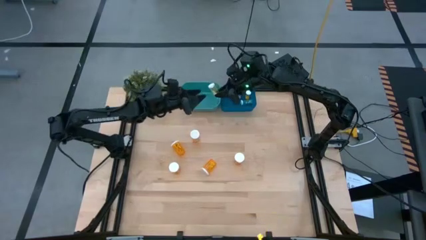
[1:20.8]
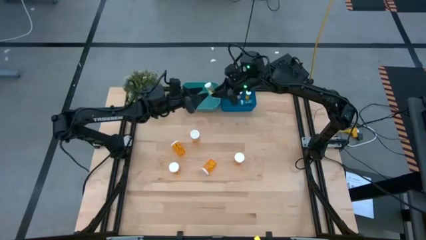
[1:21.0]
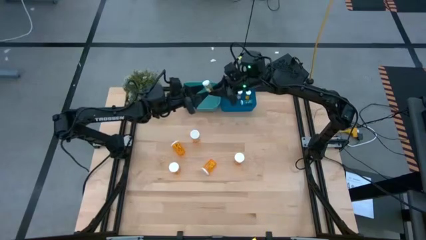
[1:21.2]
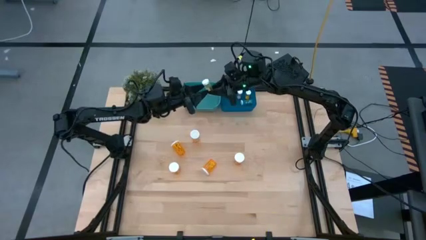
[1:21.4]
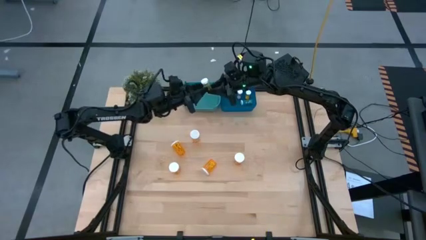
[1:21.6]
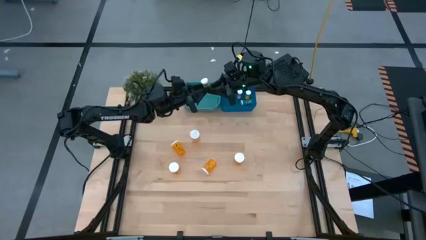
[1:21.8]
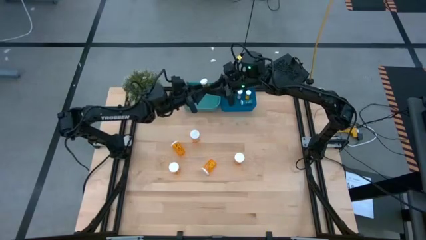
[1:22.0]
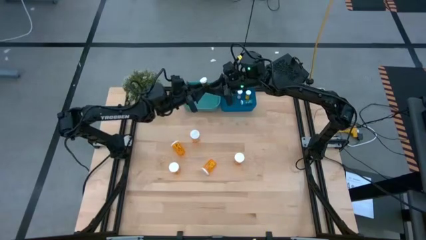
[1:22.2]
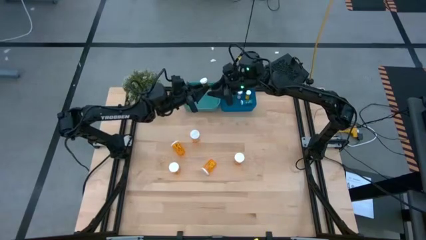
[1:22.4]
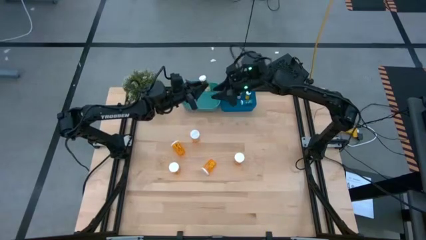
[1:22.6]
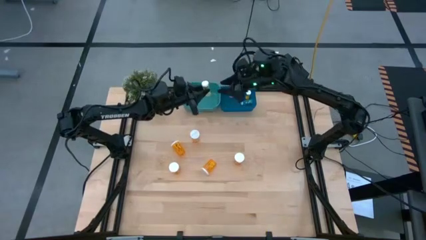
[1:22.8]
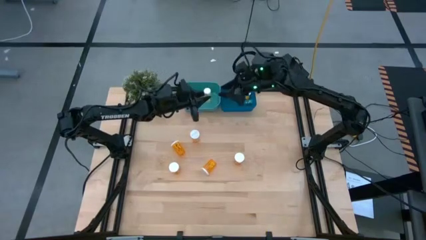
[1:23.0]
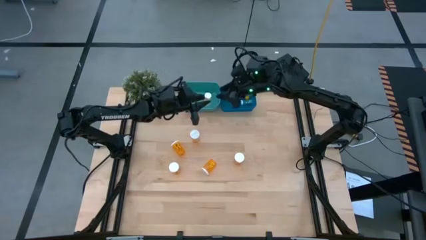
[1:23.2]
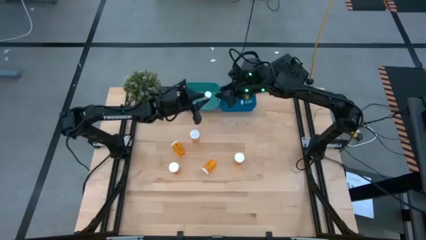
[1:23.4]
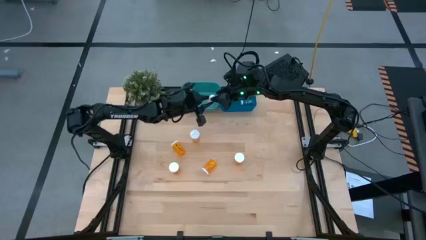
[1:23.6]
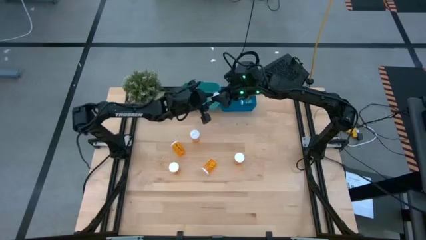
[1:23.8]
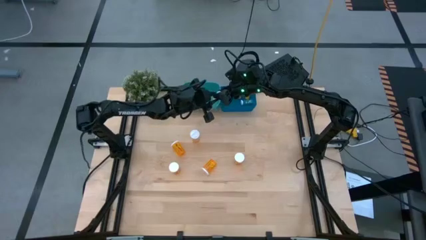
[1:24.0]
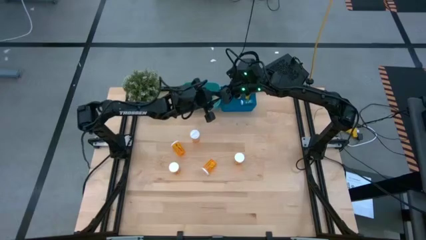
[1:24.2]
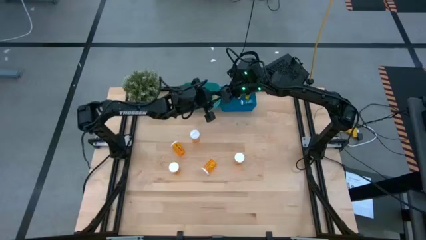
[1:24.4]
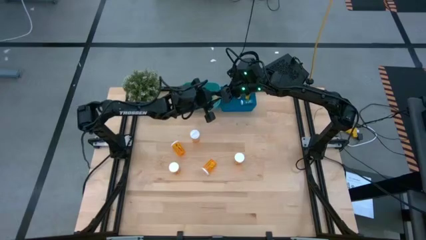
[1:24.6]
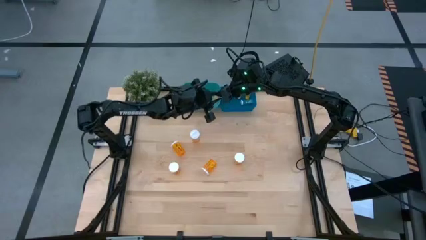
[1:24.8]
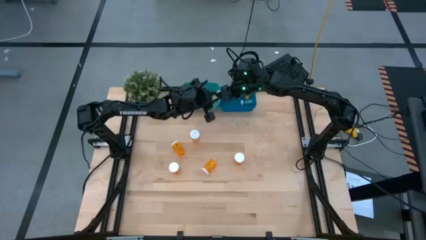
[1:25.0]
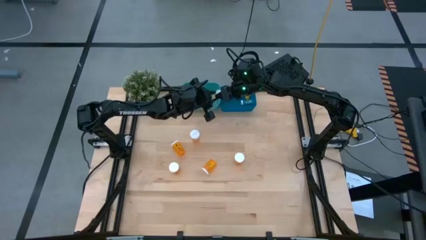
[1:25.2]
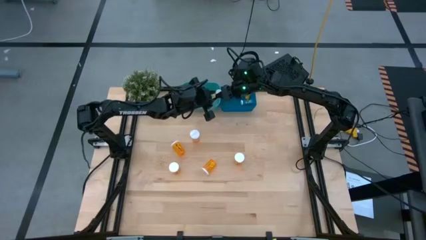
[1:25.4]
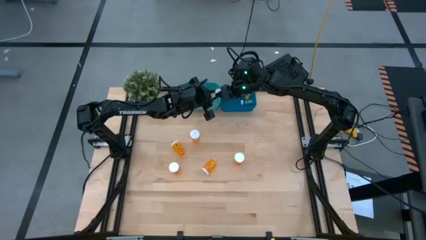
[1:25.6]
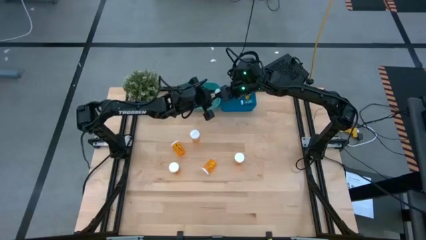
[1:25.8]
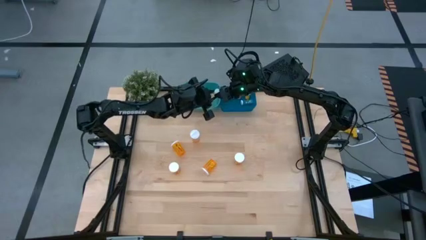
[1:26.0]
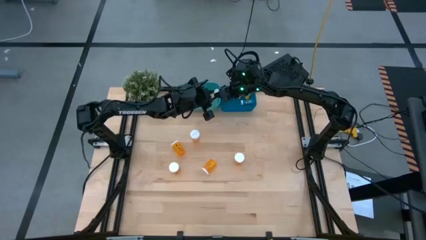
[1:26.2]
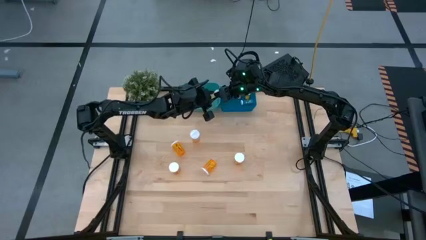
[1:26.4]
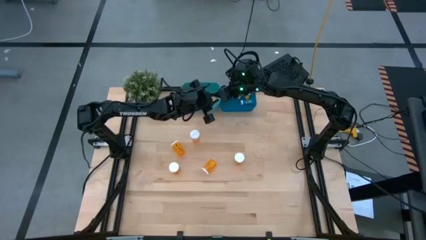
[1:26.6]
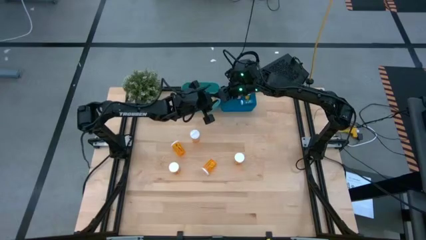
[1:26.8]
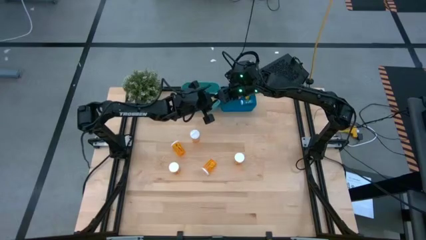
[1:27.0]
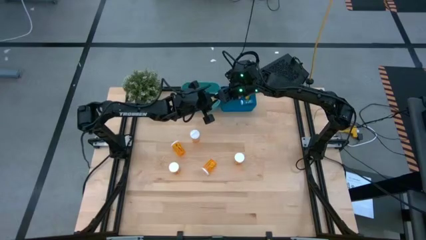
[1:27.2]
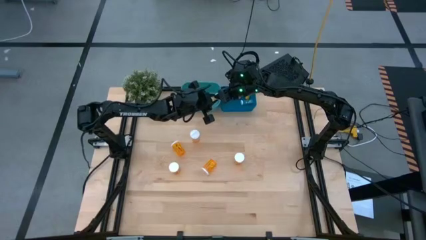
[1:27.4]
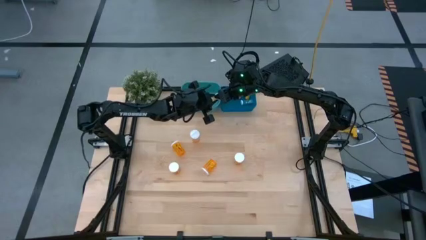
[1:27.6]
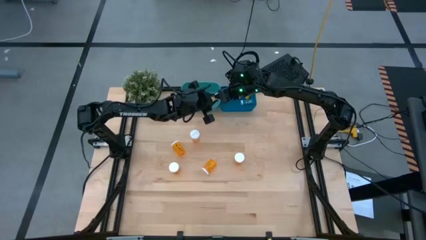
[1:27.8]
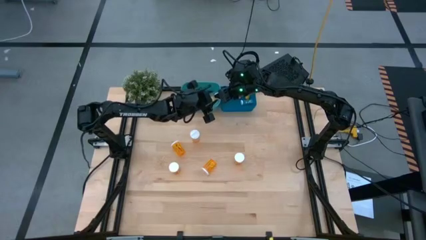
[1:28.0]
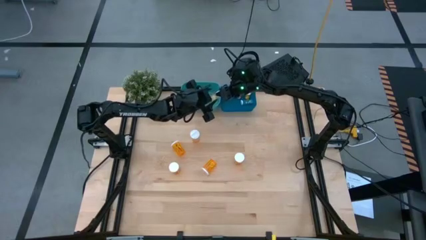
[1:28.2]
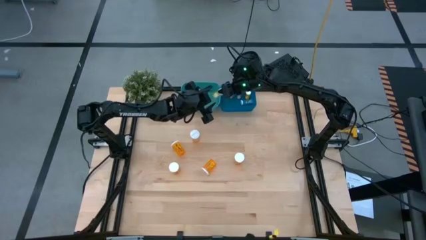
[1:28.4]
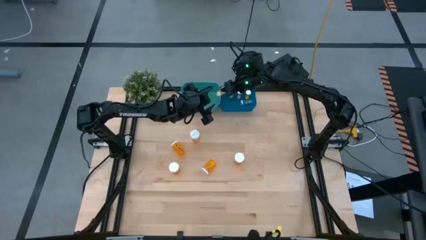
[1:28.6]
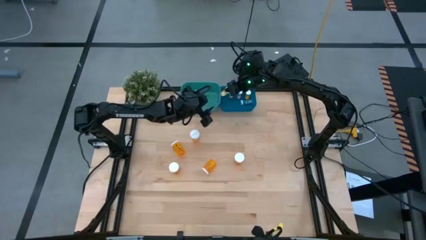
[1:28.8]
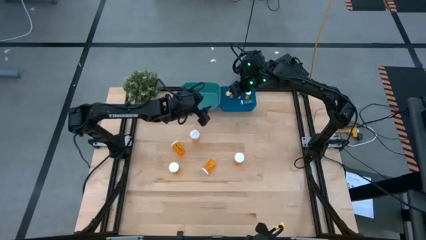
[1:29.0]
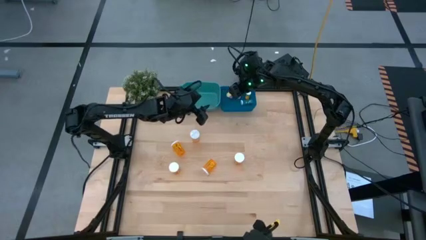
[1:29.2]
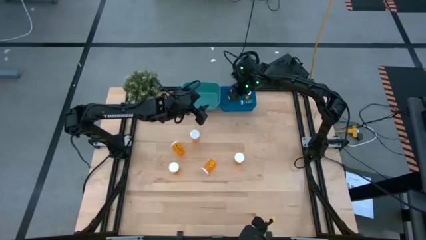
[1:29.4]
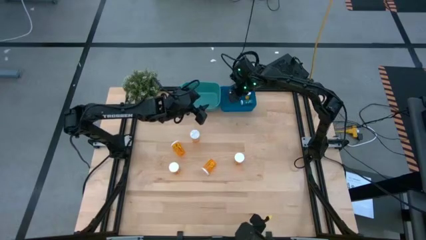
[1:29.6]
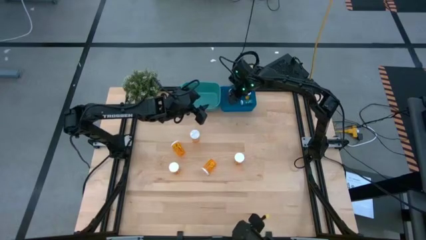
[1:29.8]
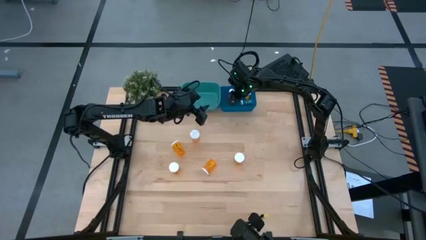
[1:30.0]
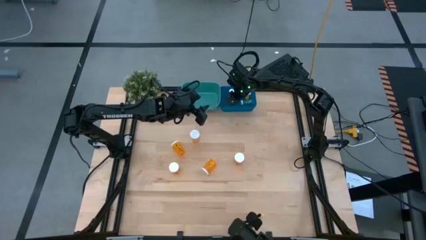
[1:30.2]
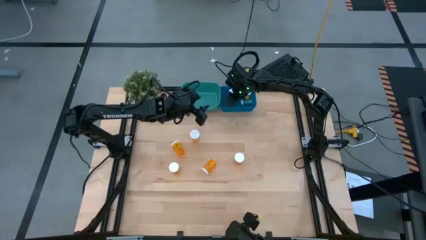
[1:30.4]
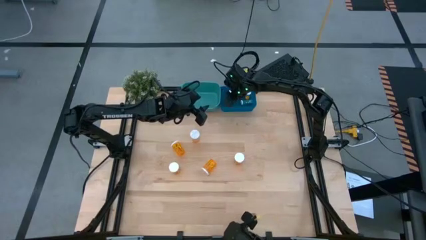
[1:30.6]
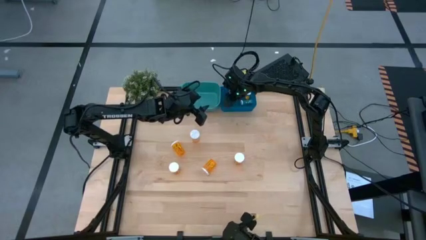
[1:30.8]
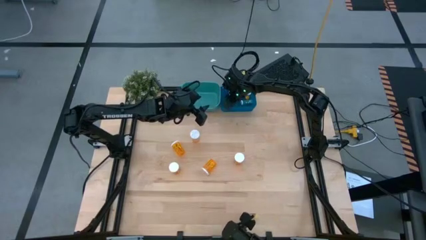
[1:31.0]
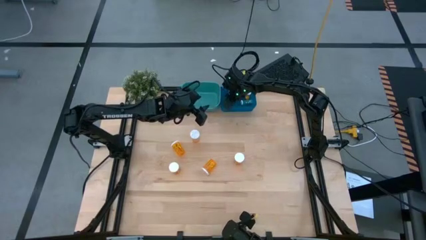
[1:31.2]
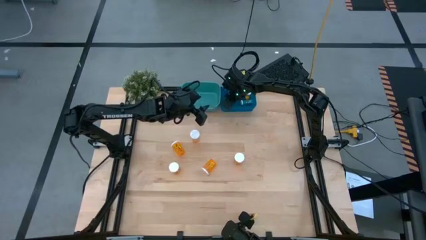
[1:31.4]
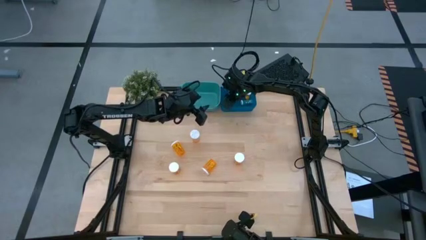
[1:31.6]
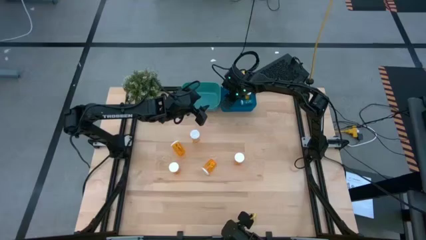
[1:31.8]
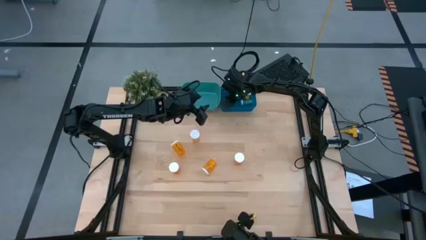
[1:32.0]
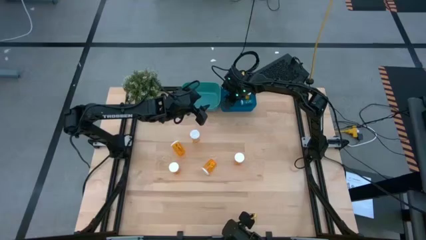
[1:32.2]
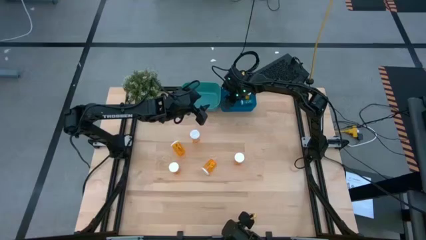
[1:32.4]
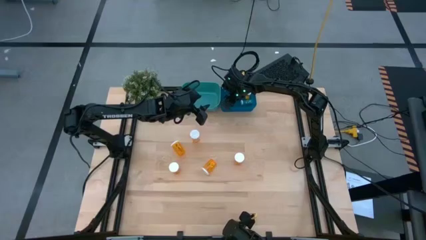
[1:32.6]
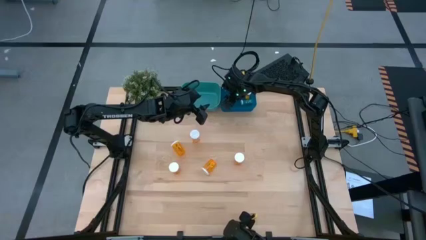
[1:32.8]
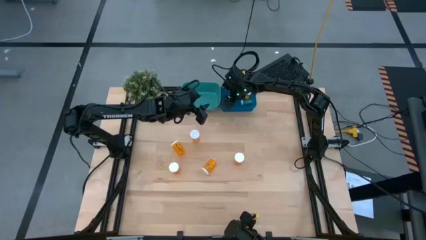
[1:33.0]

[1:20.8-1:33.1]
Task: Pick and place medicine bottles into bin by pill shape (circle, oval)
Adjust the small yellow tablet bottle in the blue bin

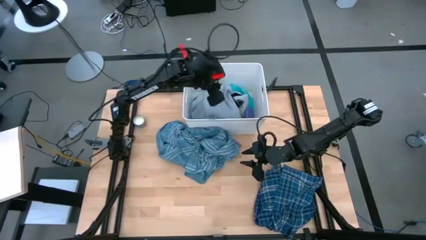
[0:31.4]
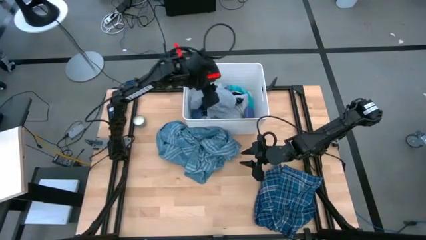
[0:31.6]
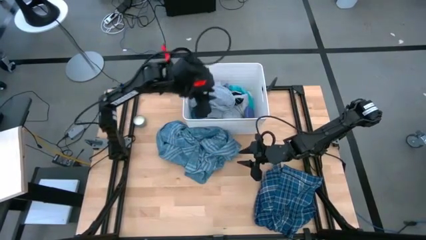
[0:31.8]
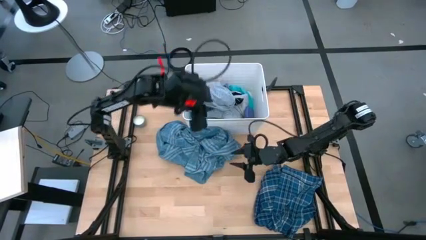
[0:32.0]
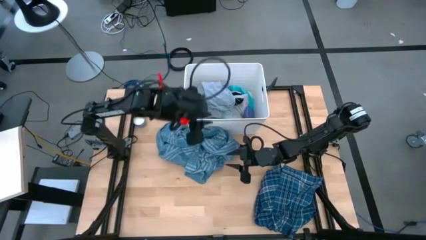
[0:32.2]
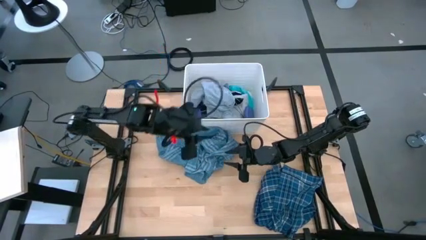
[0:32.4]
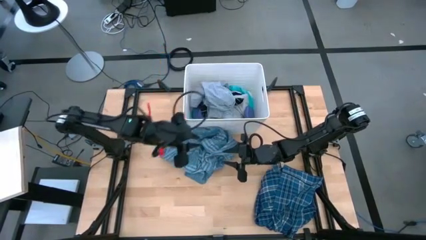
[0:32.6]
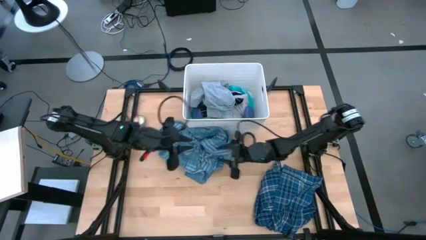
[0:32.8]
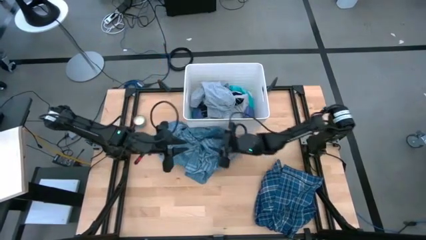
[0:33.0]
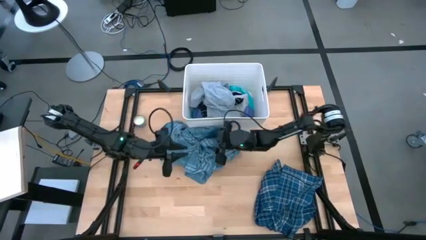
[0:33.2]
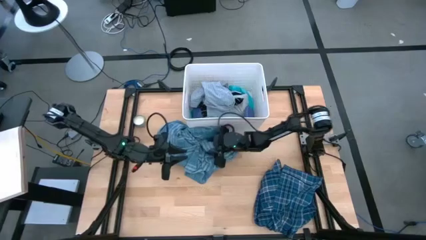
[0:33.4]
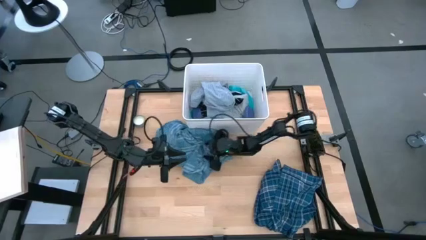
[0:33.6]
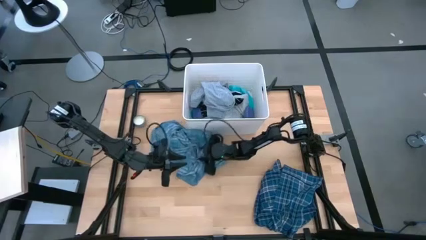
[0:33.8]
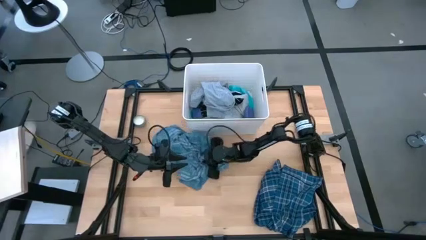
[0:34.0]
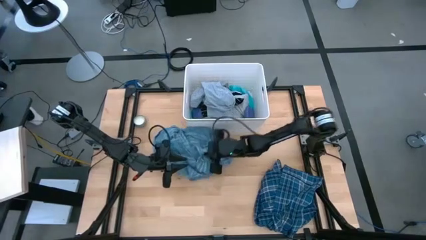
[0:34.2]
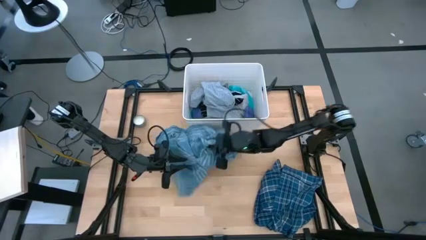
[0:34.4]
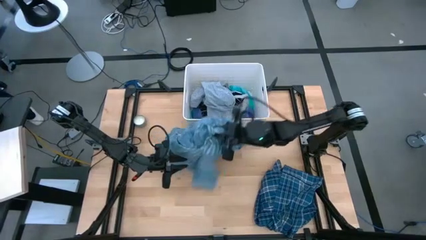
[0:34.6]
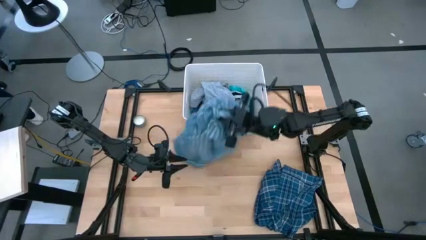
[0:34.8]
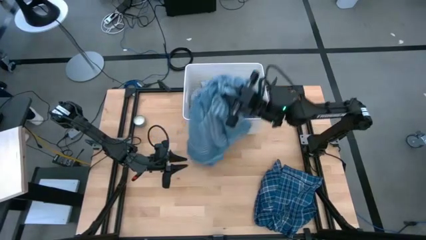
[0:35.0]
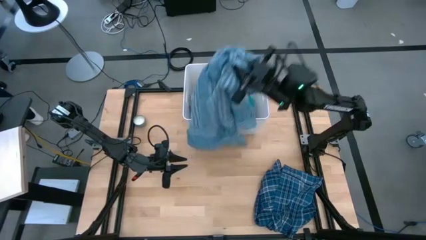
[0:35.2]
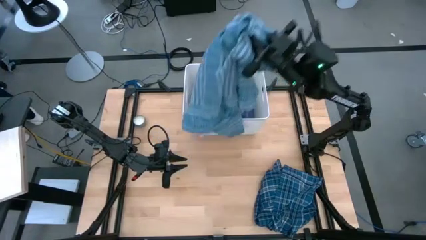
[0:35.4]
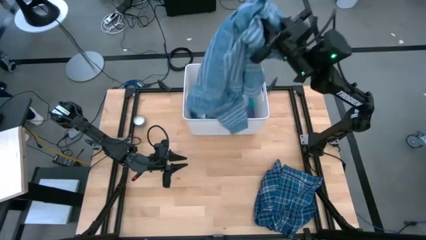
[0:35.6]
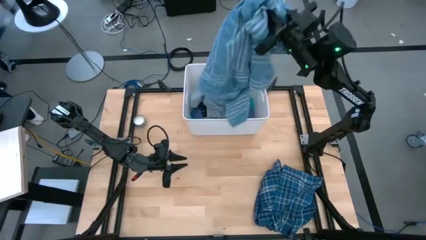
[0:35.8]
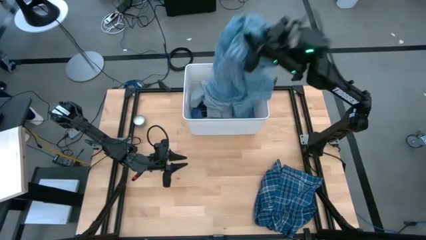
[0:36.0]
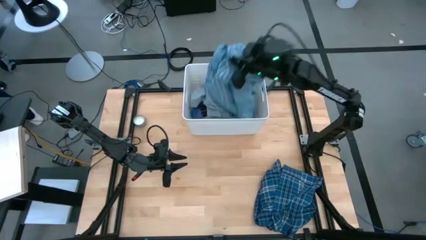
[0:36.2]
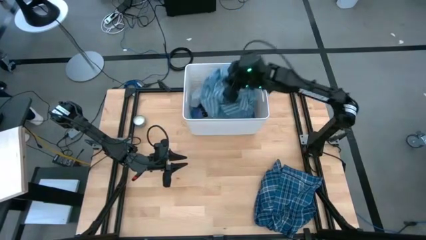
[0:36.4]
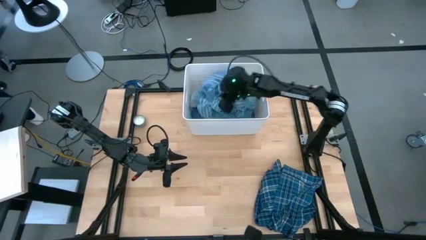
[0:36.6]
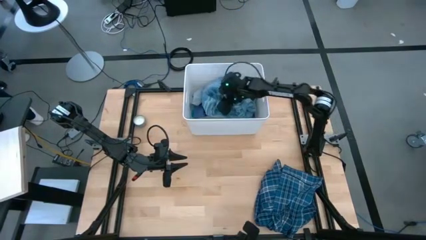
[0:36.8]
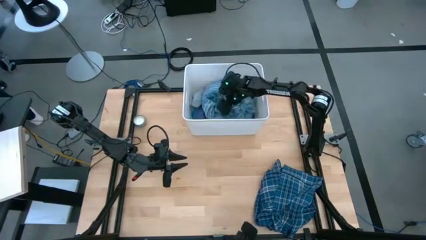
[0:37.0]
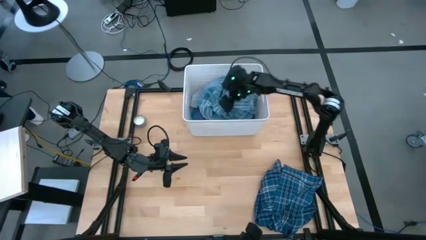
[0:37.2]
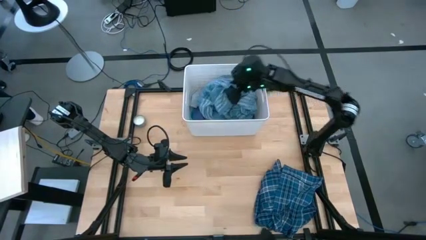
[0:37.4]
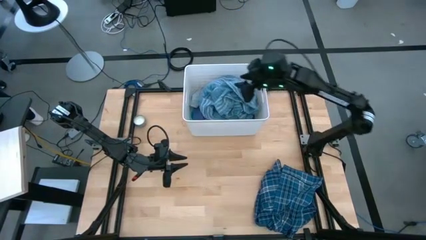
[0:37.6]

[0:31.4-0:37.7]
Task: Sort clothes
Put the light blue blanket into the white laundry organizer
